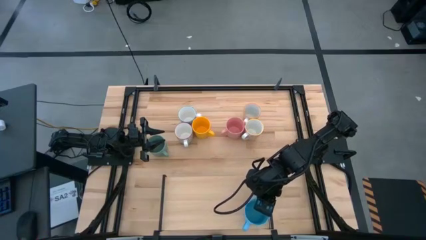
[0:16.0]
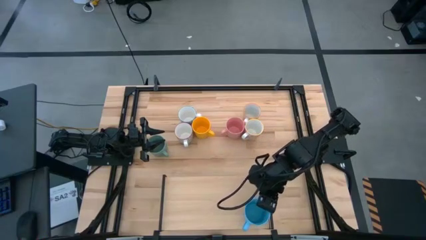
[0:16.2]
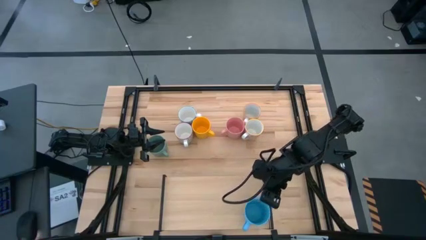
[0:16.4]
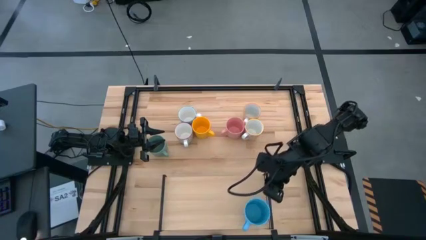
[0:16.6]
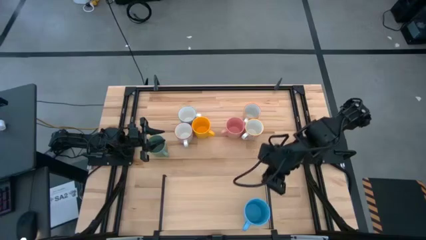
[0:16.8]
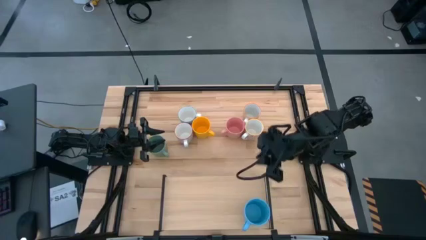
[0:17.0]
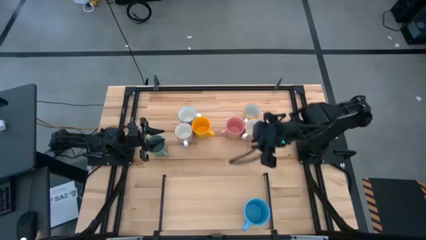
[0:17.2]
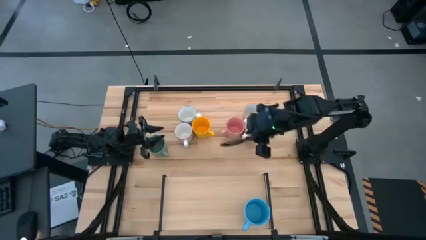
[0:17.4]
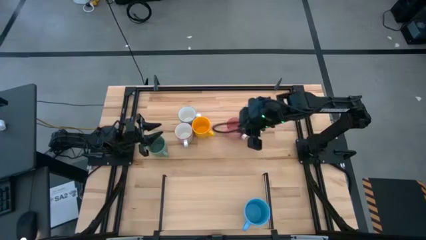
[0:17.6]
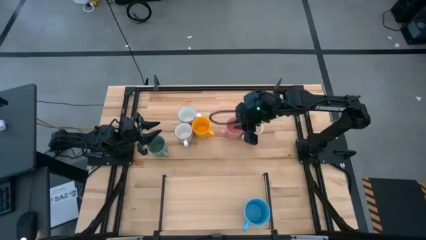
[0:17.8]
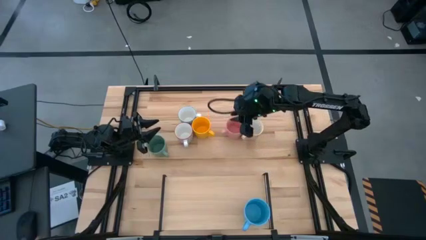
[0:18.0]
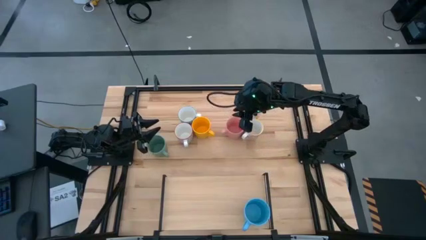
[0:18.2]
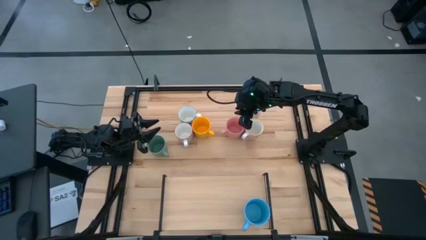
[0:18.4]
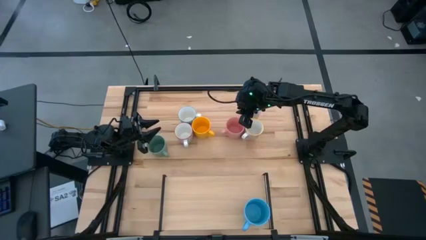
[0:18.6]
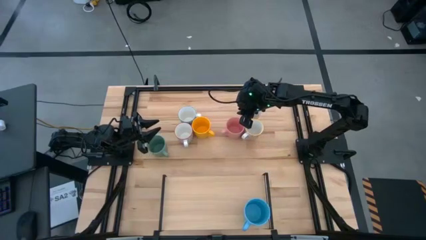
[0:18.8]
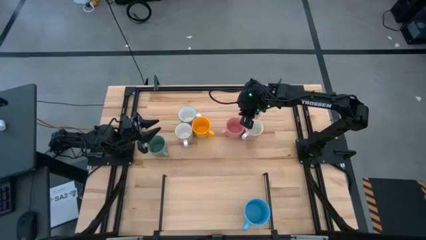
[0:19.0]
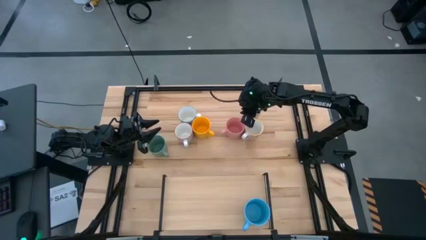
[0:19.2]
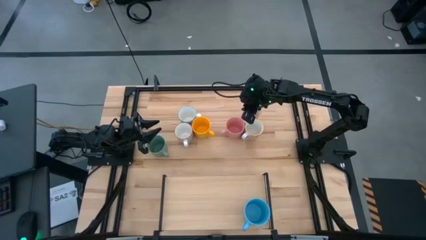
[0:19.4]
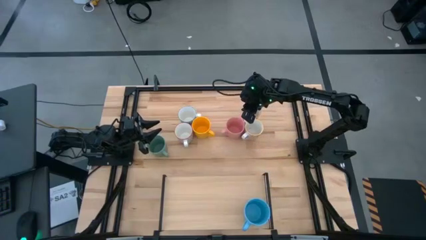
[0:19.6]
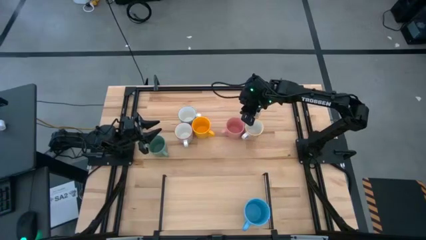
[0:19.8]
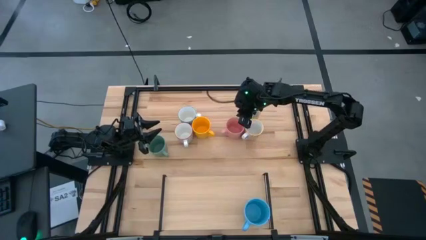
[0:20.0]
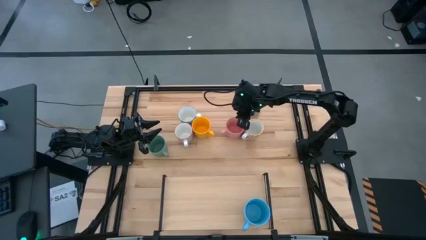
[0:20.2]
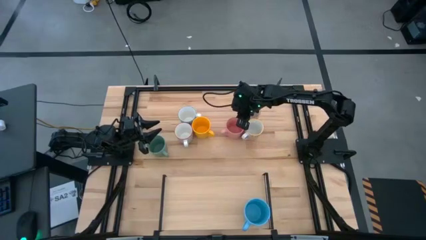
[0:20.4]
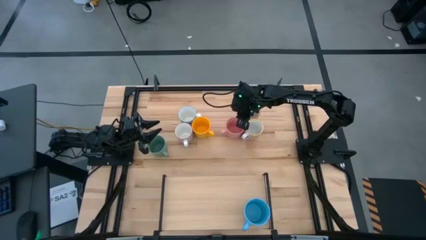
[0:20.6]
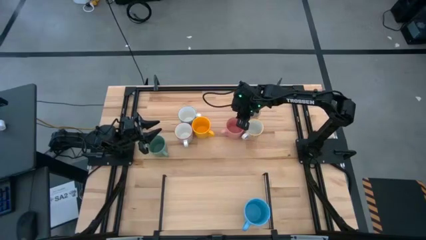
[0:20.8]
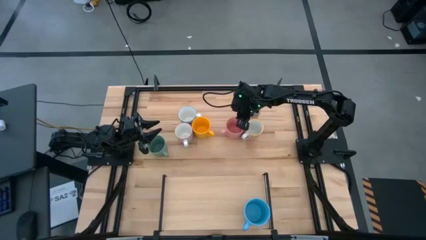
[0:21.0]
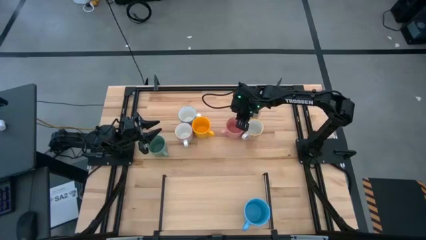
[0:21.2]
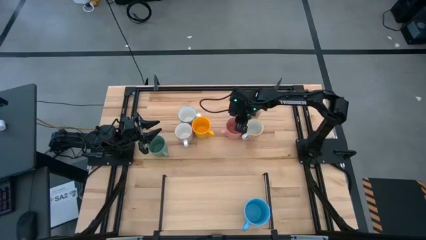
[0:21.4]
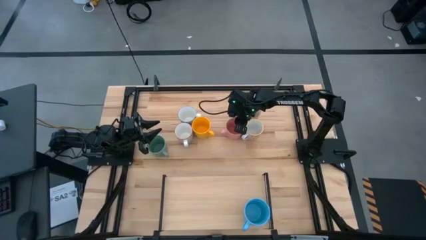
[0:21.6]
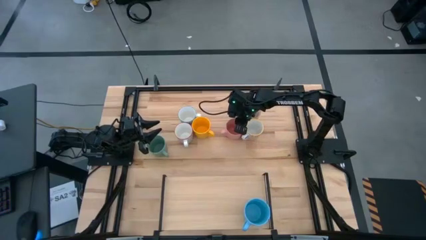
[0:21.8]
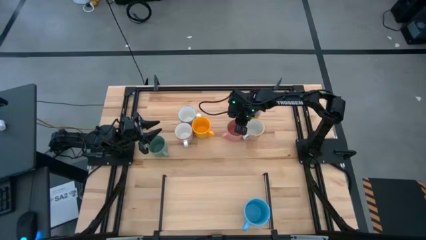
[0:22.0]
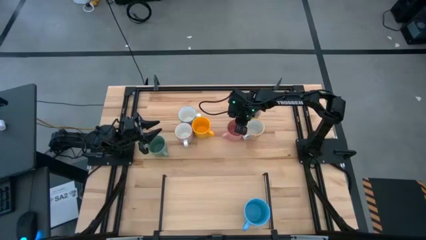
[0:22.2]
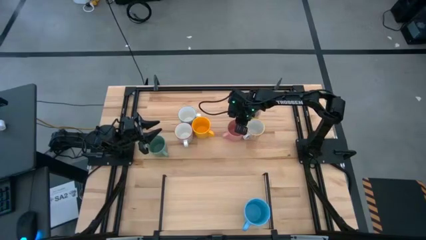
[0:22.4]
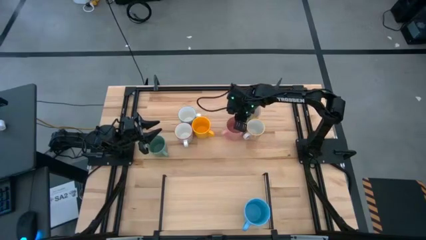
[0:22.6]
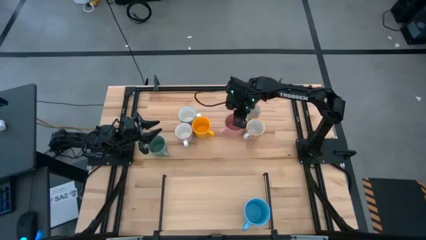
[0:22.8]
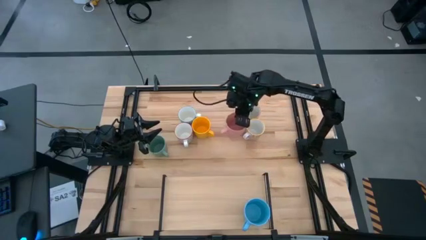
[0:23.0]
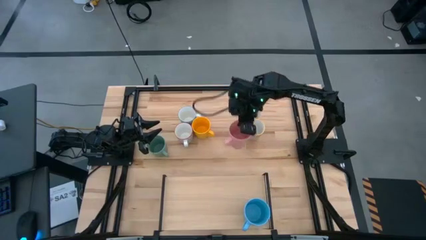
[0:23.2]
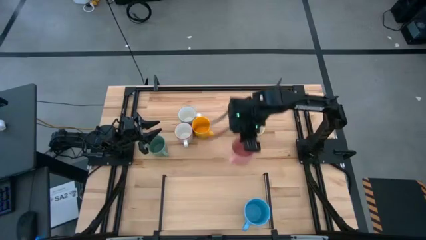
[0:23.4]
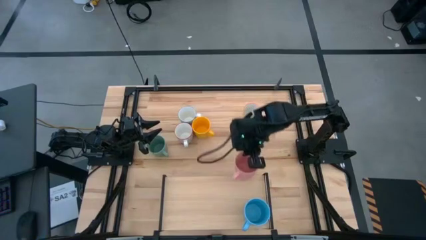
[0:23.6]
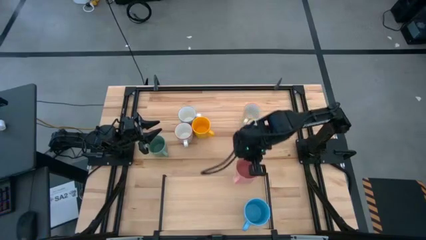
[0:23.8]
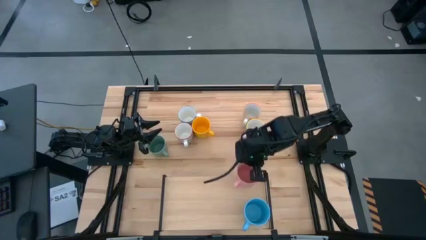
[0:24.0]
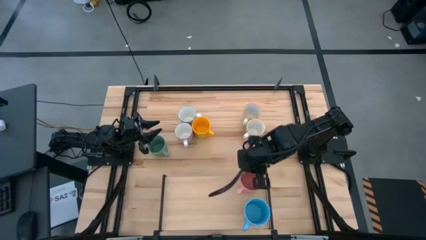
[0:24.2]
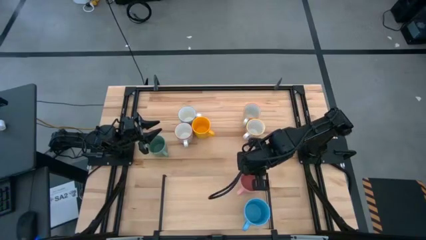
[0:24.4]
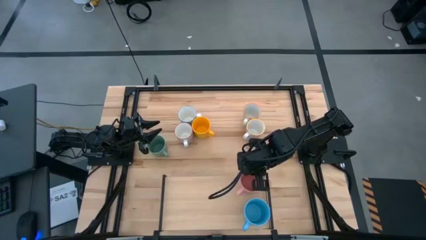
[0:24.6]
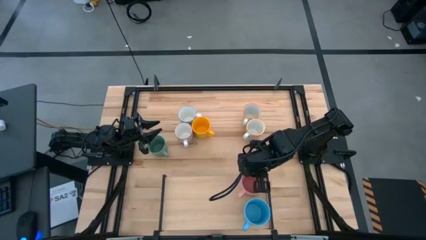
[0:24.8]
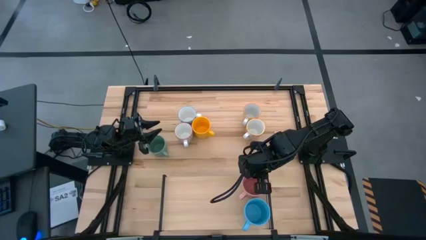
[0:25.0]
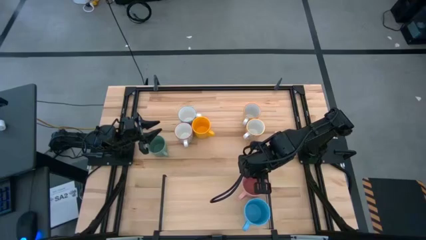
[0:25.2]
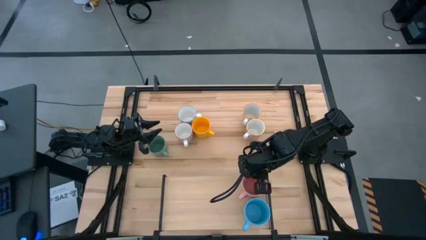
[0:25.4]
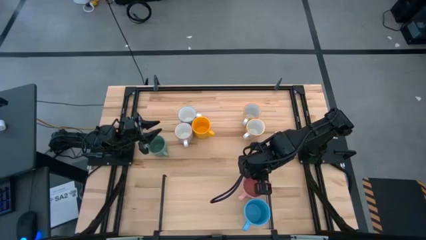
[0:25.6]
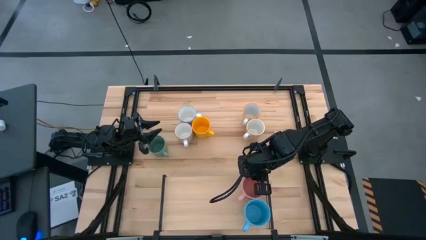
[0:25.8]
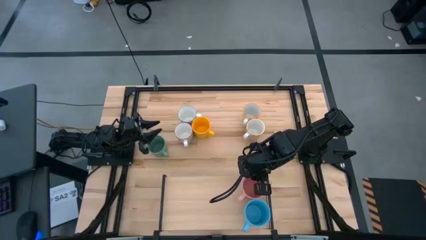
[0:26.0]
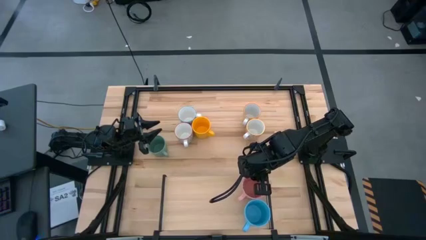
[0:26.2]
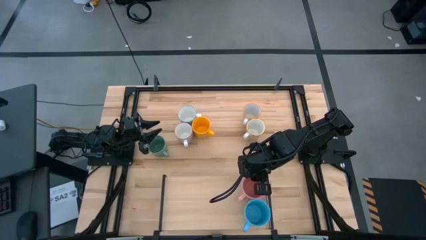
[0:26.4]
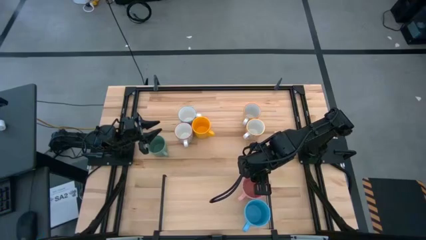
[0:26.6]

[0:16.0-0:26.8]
Task: Place coffee mugs
Put the pink mug on the shelf

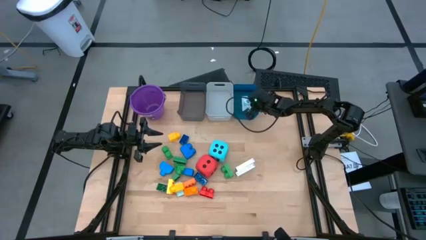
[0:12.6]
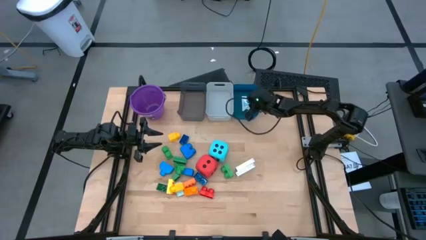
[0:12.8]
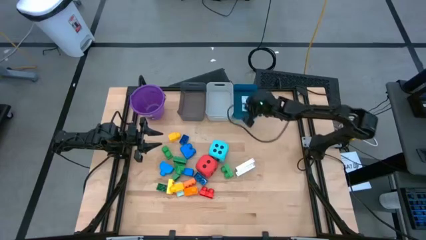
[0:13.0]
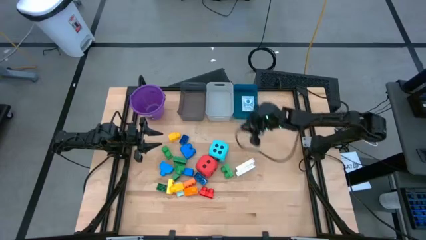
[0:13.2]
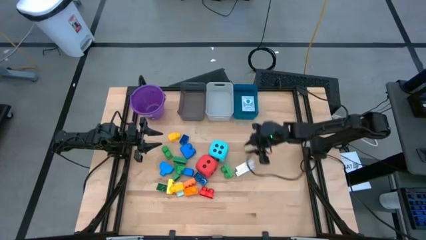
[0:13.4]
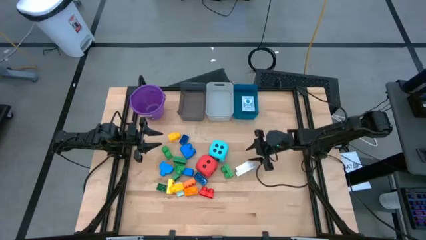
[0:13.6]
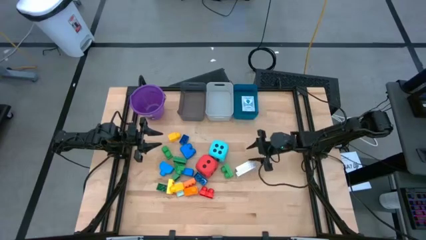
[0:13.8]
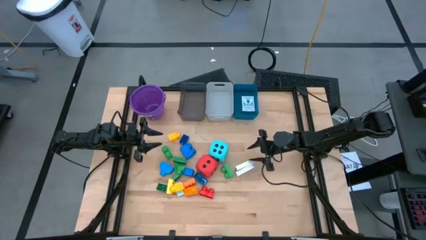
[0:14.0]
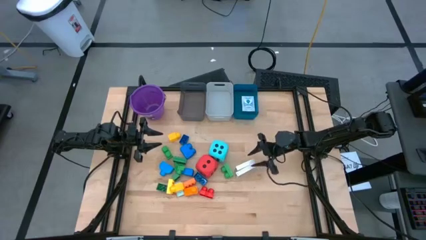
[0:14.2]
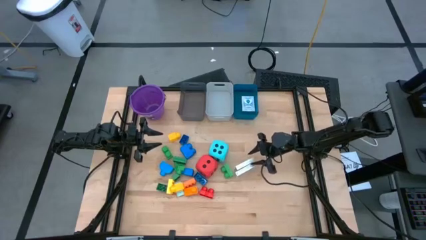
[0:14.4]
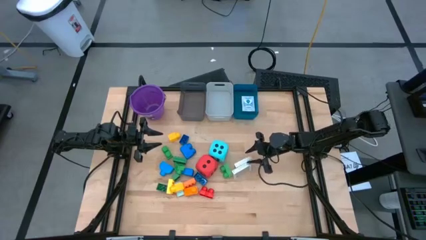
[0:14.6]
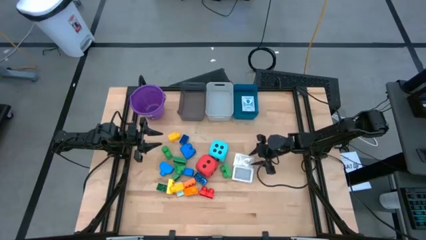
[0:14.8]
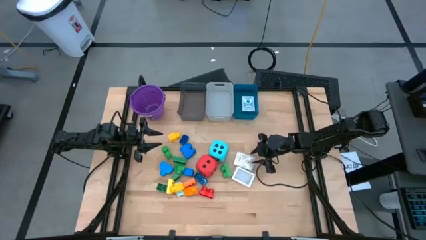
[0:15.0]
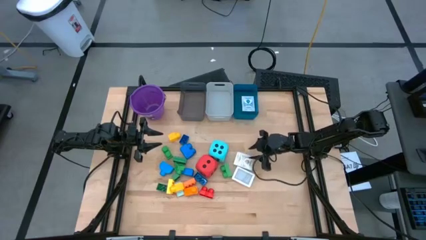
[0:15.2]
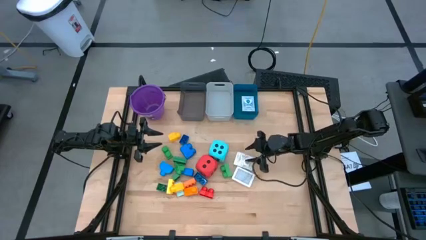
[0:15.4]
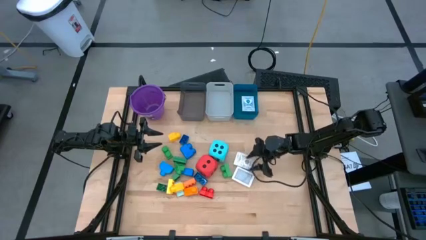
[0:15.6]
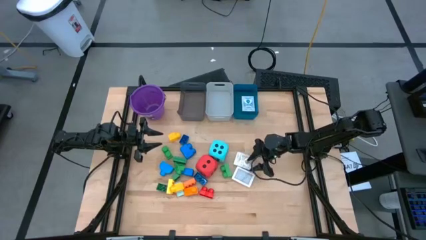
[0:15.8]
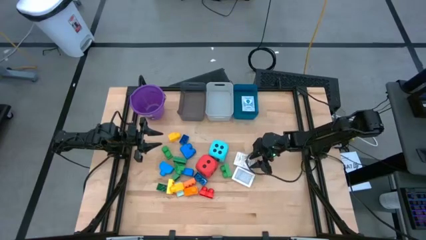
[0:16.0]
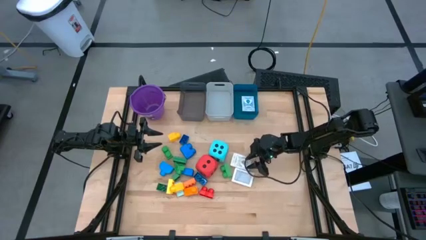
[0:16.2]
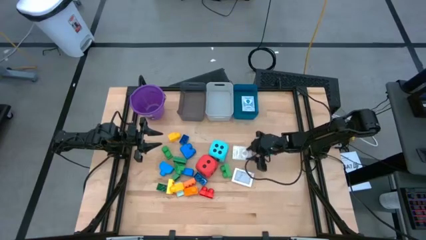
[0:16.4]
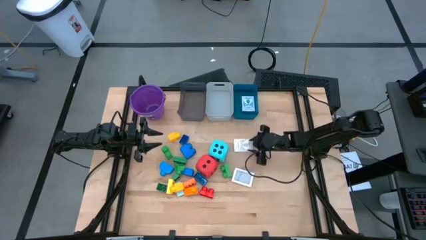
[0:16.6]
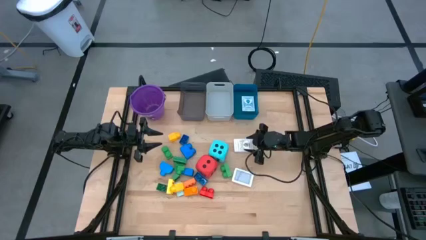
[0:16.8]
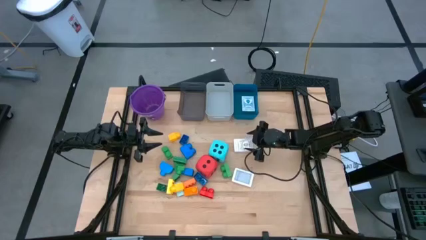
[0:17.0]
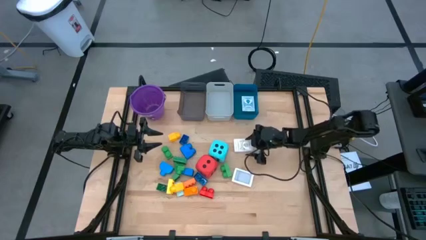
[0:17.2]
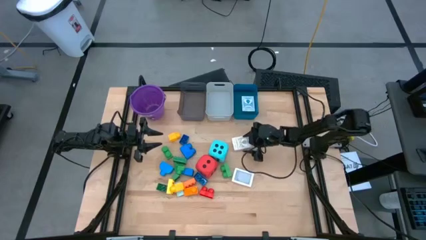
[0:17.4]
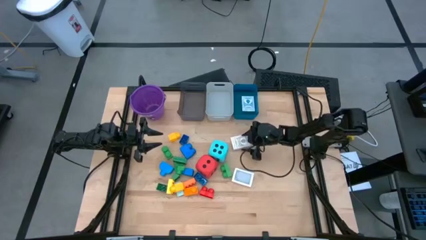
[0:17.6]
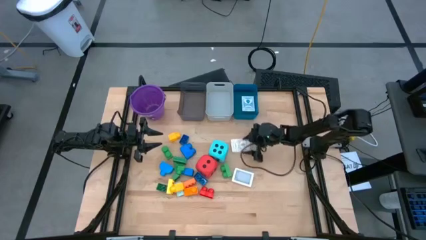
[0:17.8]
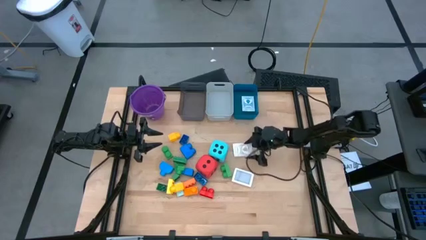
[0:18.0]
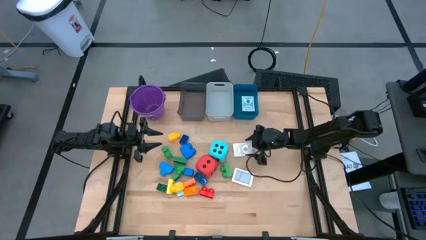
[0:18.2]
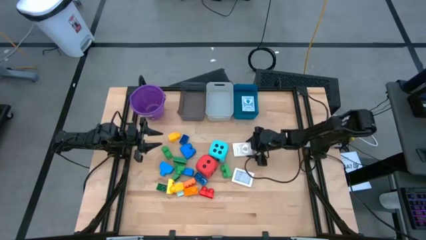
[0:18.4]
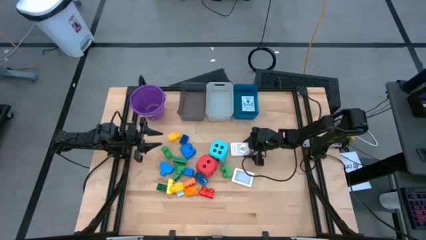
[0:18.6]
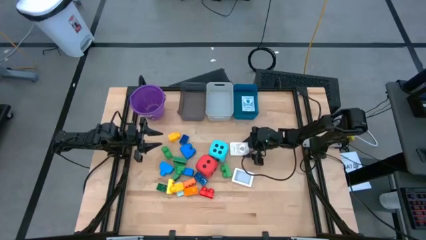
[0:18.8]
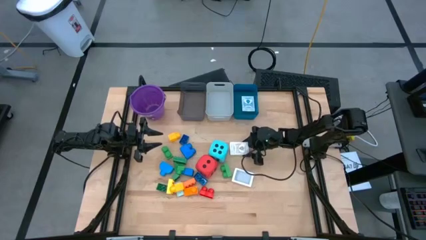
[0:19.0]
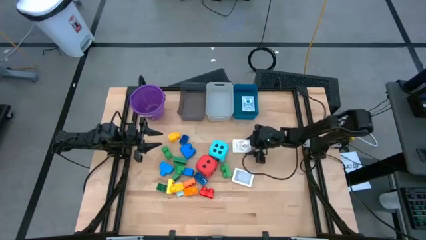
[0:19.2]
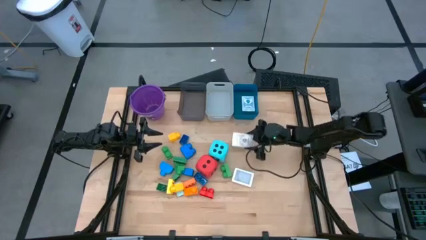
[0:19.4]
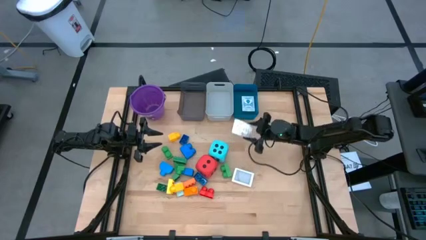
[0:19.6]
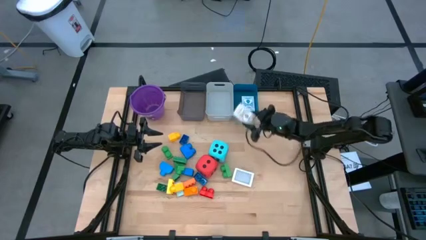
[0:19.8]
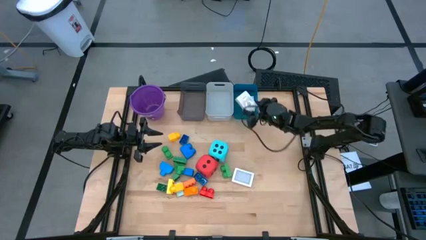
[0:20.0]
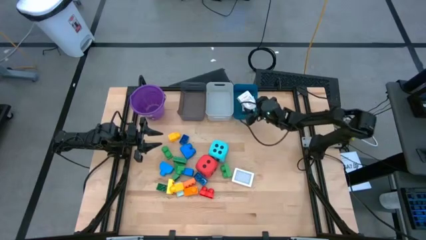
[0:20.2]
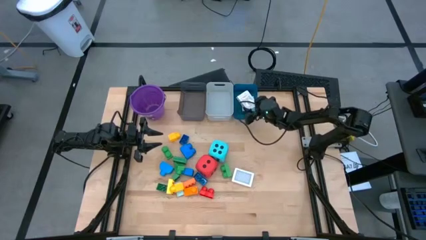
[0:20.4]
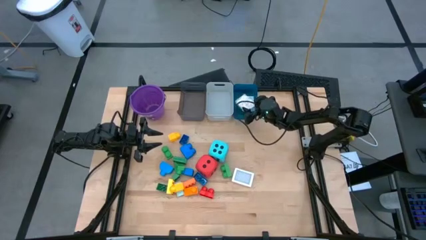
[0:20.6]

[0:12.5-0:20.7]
Task: Pick & Place Toys
Put the brown deck of cards into the blue bin
